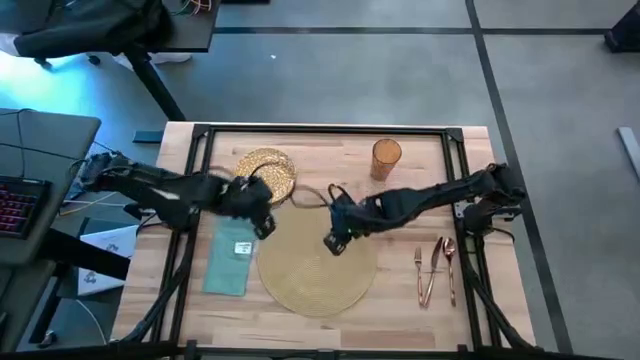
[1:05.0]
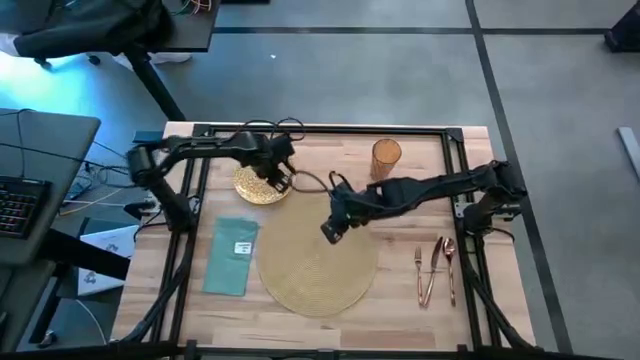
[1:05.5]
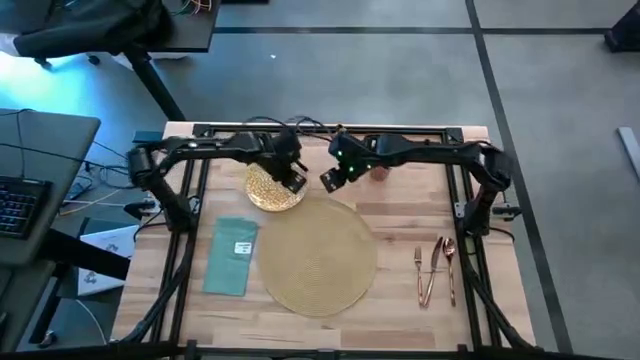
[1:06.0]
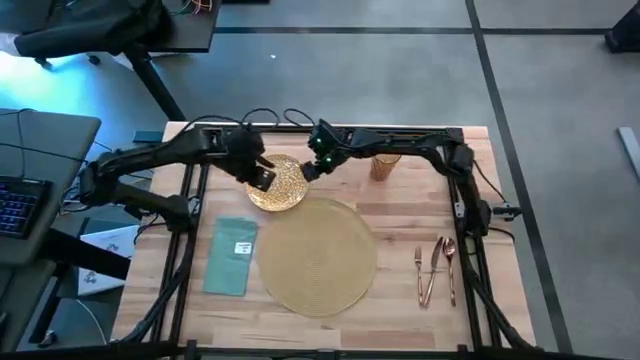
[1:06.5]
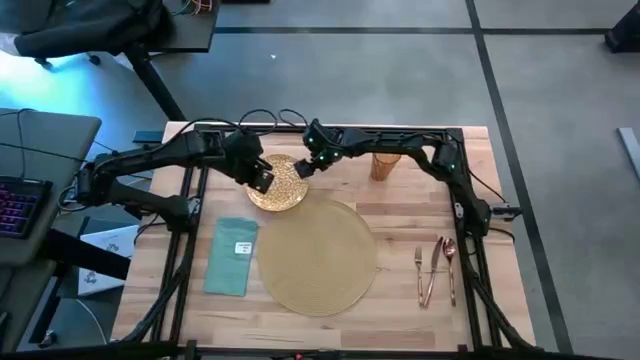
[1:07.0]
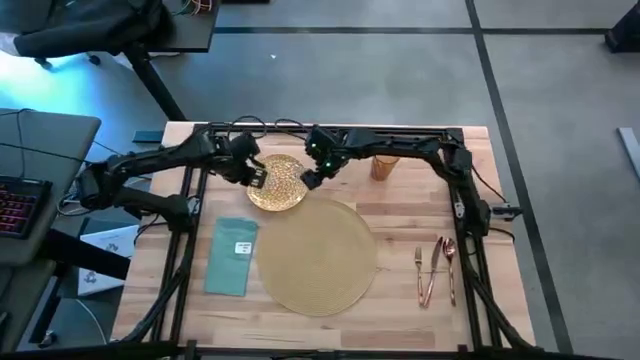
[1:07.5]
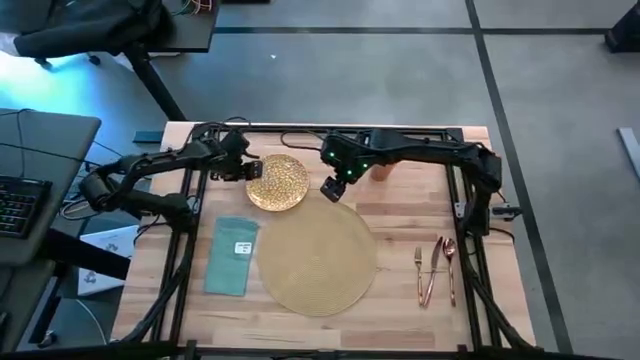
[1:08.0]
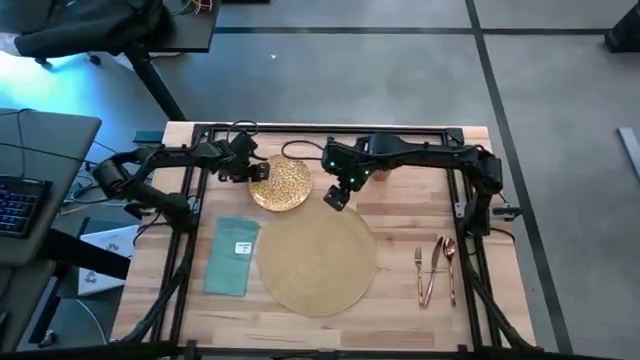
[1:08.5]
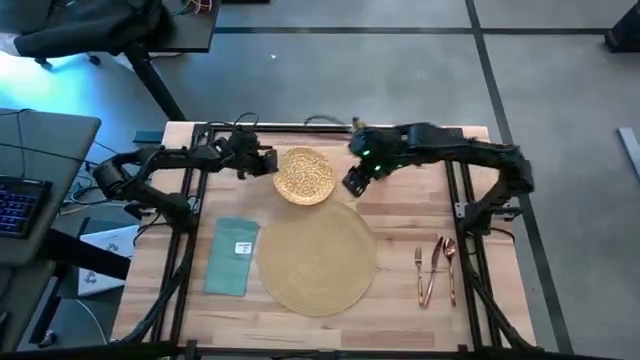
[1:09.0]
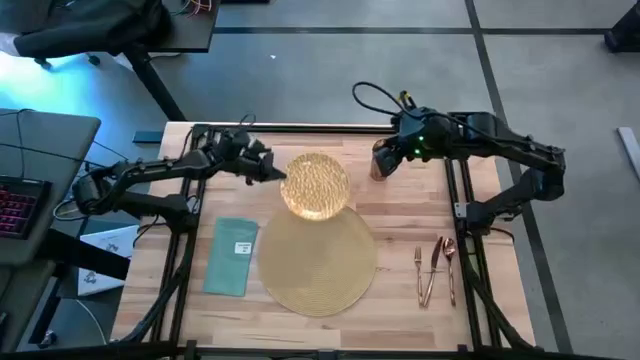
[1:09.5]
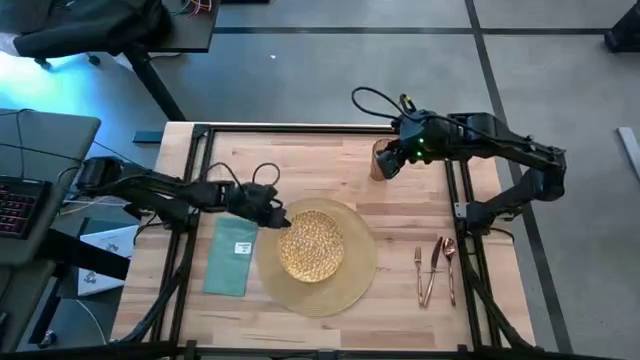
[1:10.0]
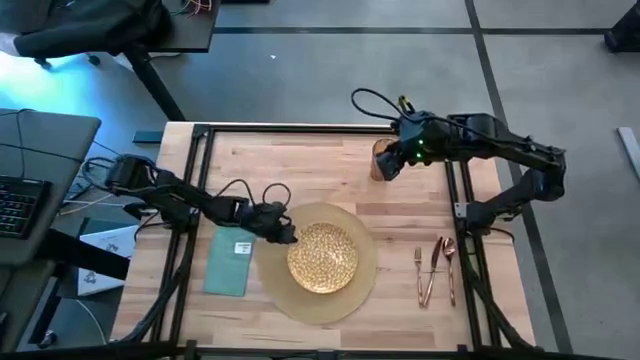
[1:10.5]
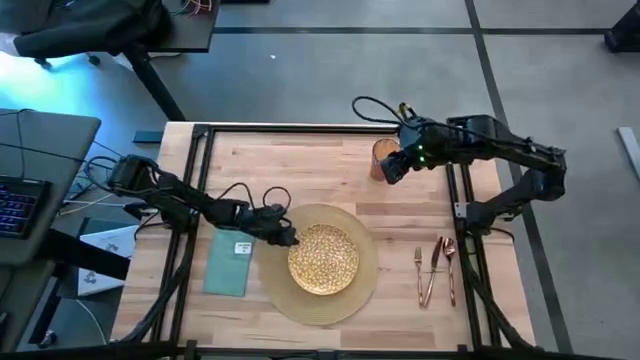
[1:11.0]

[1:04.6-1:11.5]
Task: Set table place
Put the yellow patterned plate on the mat

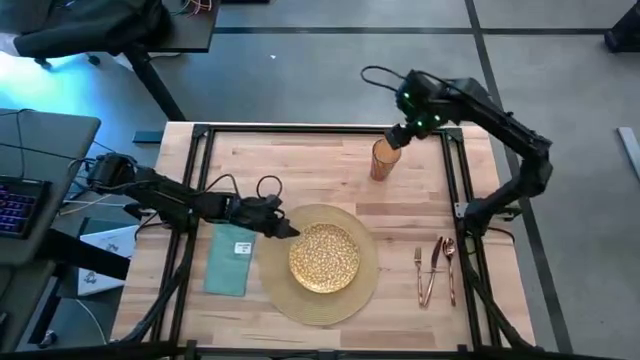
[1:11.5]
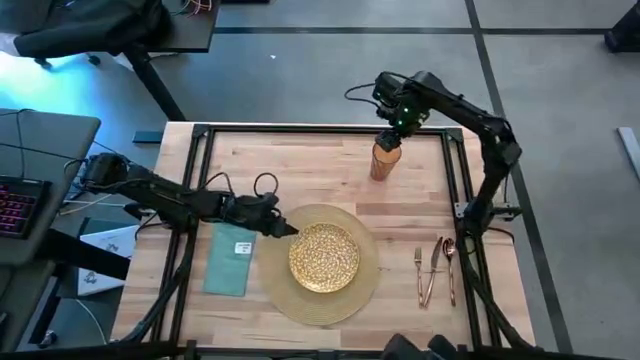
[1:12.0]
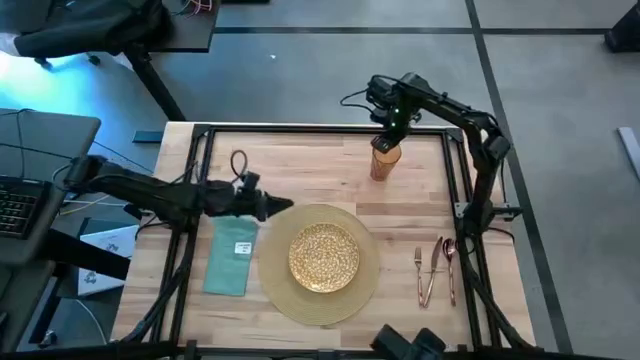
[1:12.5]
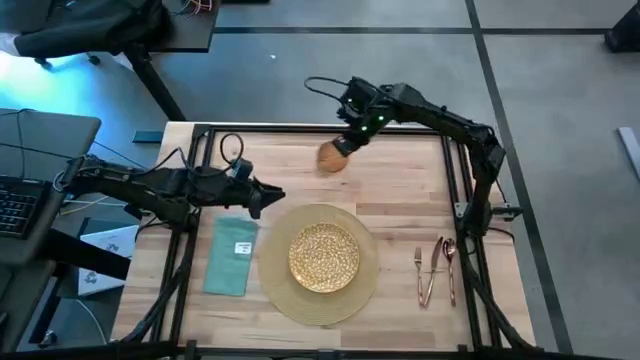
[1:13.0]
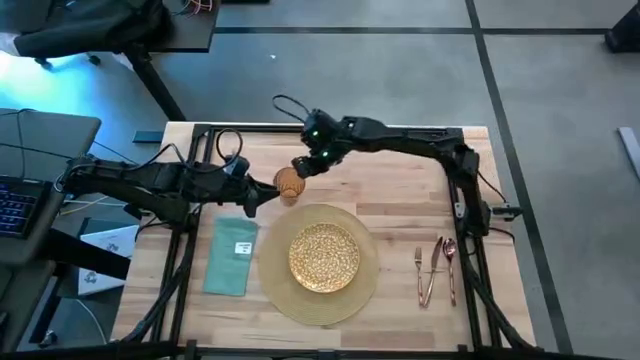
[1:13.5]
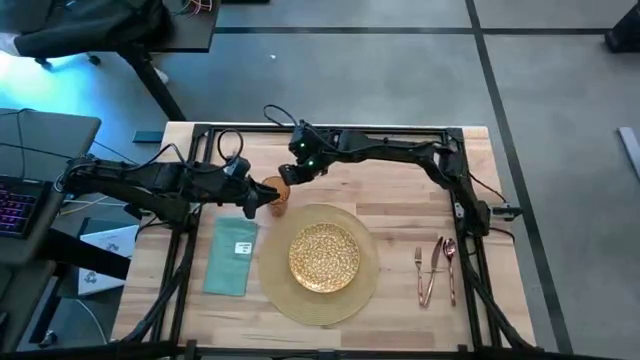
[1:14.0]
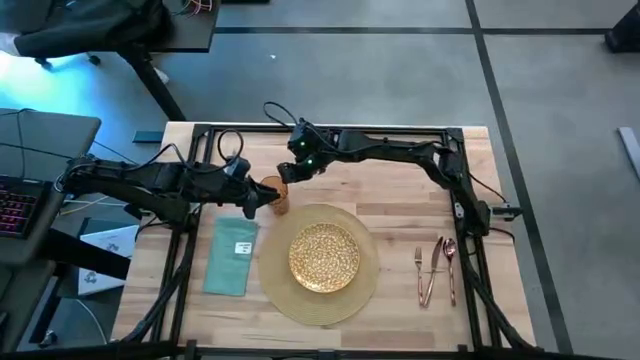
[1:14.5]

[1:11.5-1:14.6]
Put the brown glass to the middle left

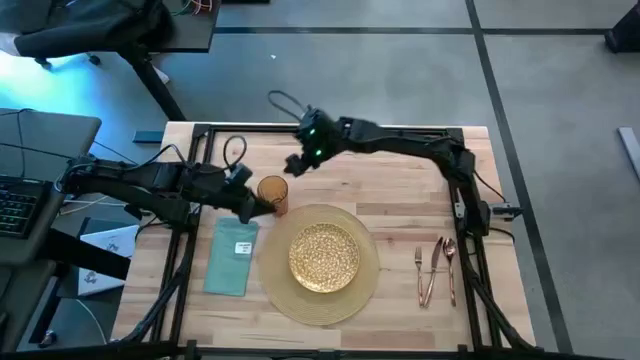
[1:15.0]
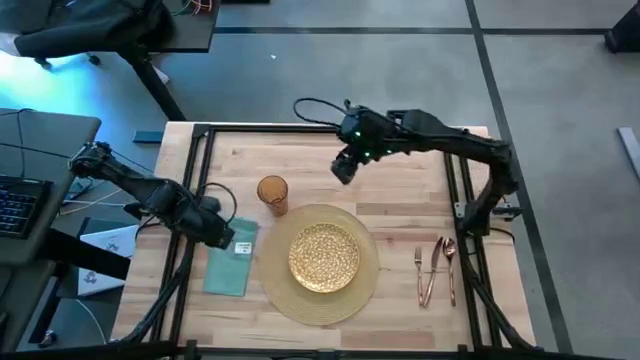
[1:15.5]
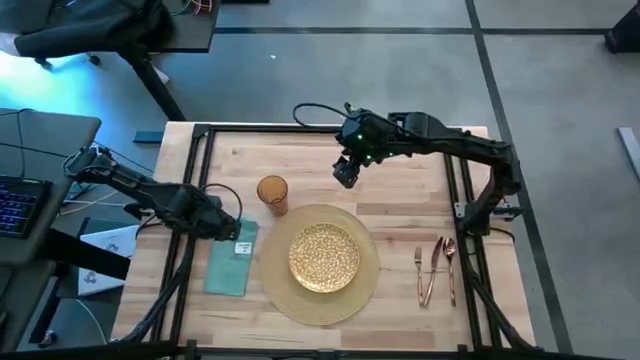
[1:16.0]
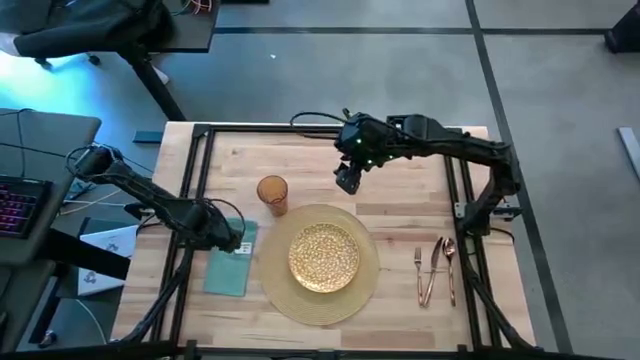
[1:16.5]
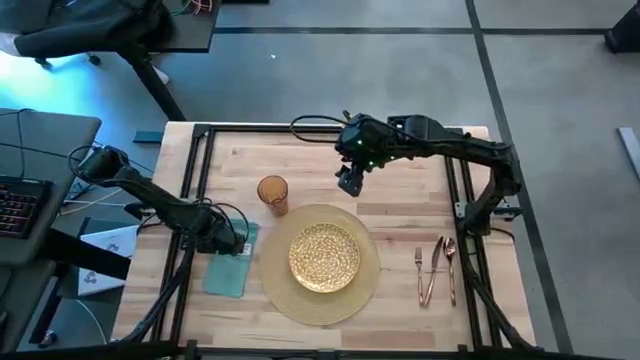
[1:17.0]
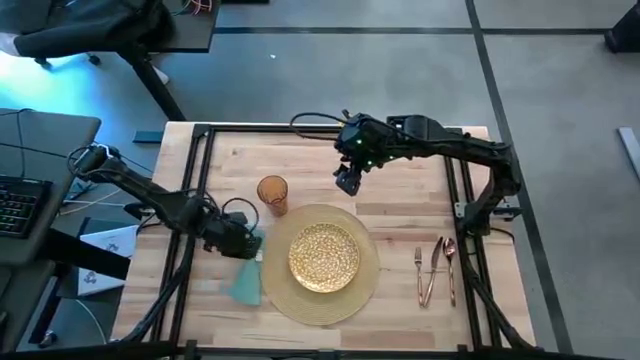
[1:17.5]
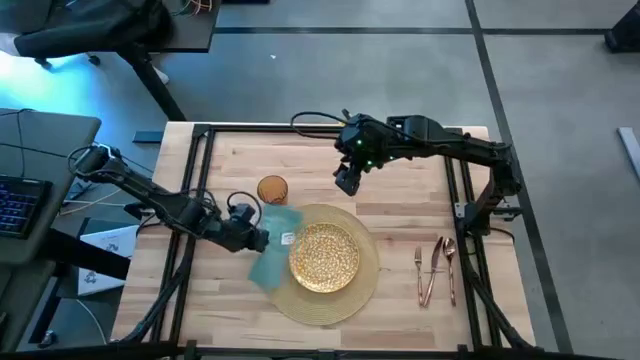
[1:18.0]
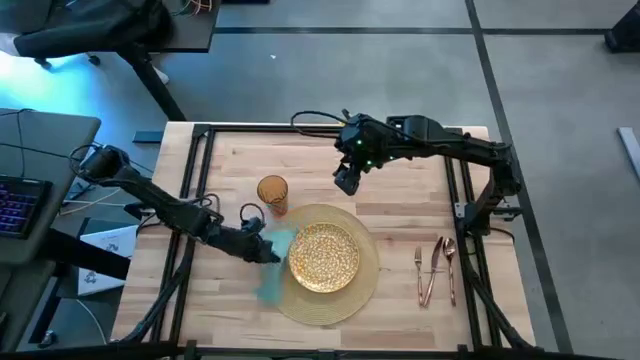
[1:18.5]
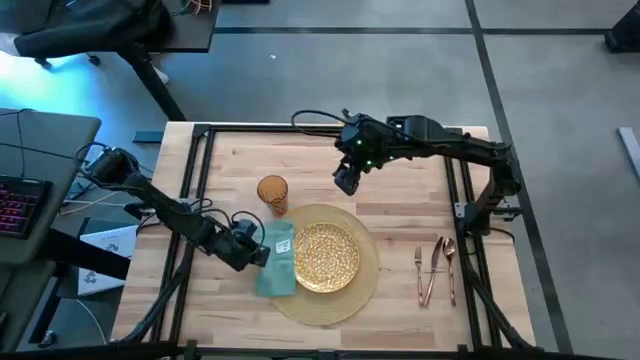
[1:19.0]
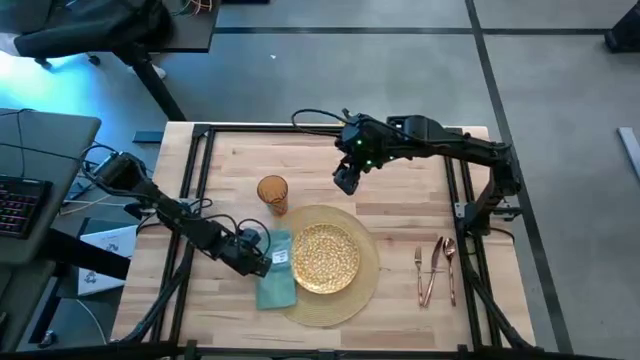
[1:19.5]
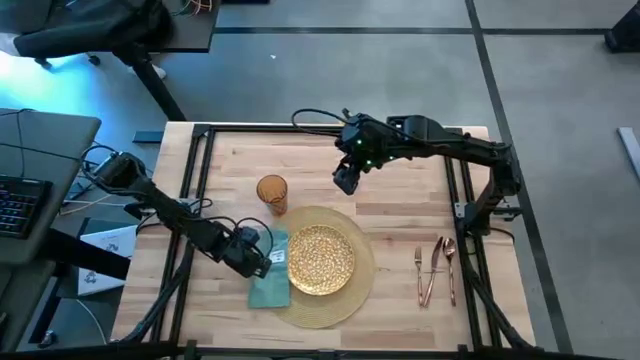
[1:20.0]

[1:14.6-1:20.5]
Put the blue napkin to the left of the mat

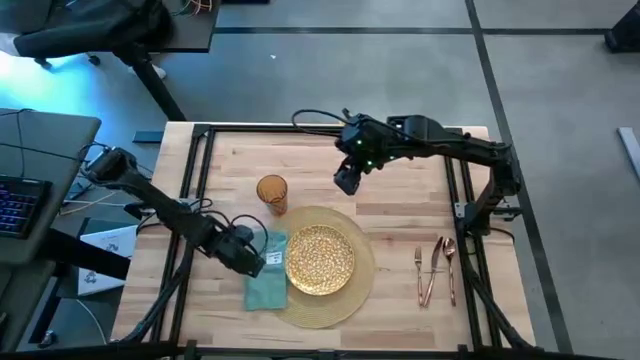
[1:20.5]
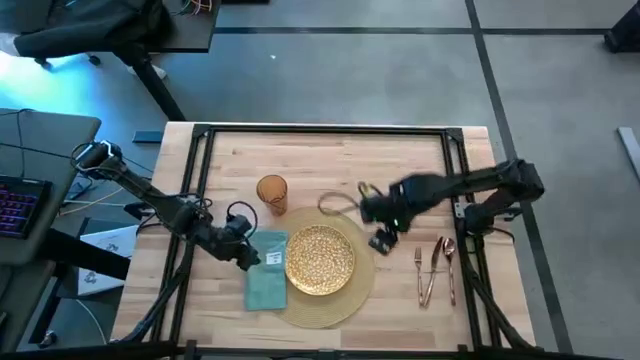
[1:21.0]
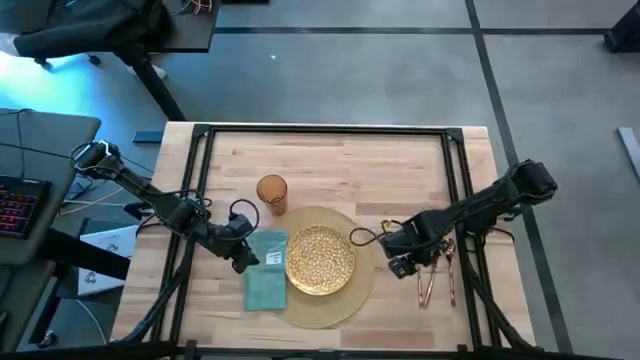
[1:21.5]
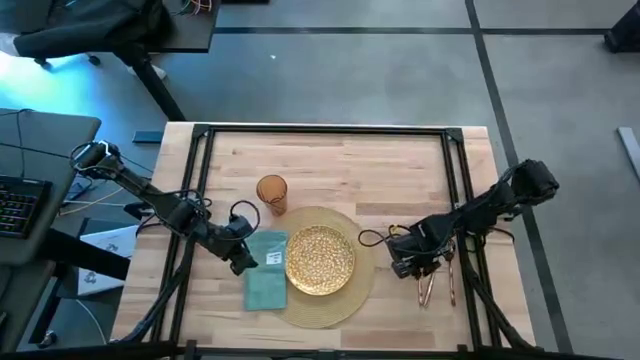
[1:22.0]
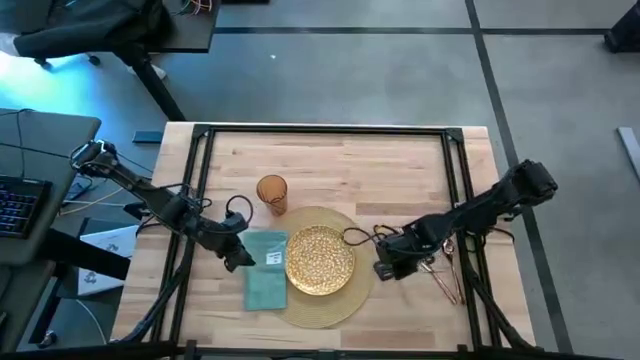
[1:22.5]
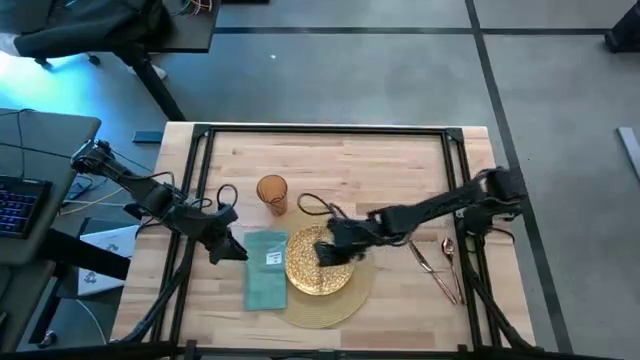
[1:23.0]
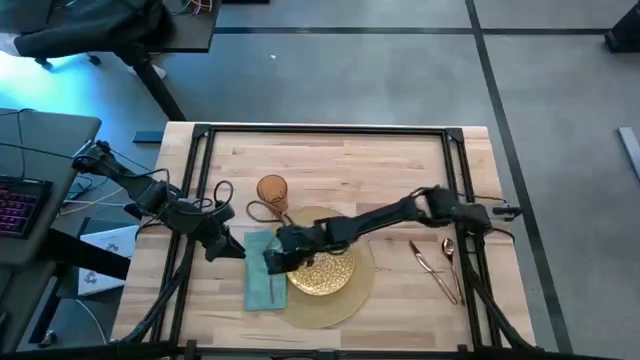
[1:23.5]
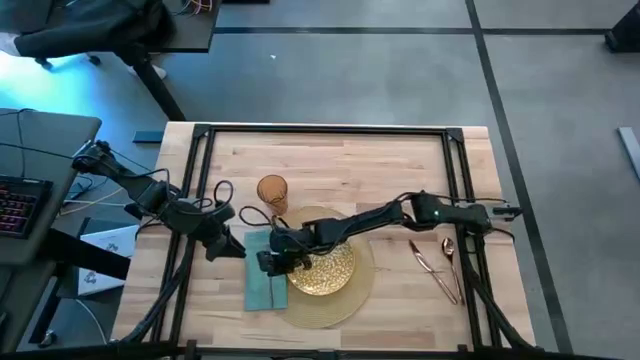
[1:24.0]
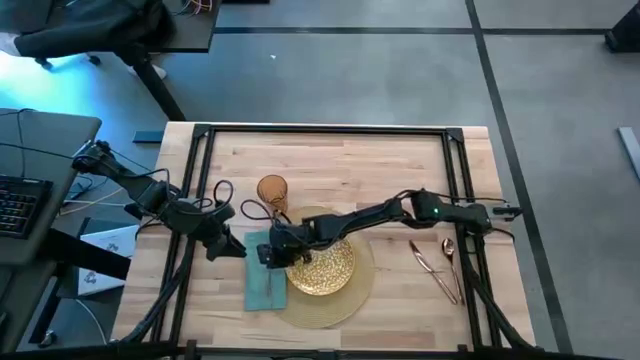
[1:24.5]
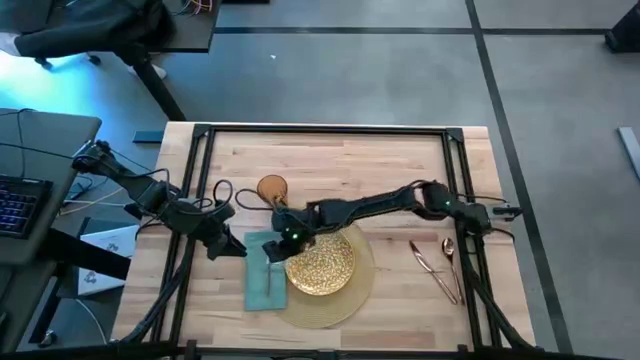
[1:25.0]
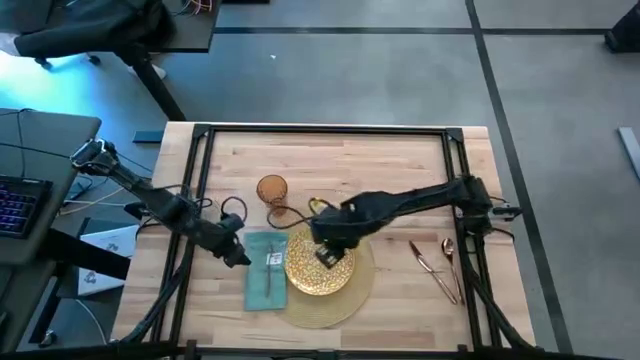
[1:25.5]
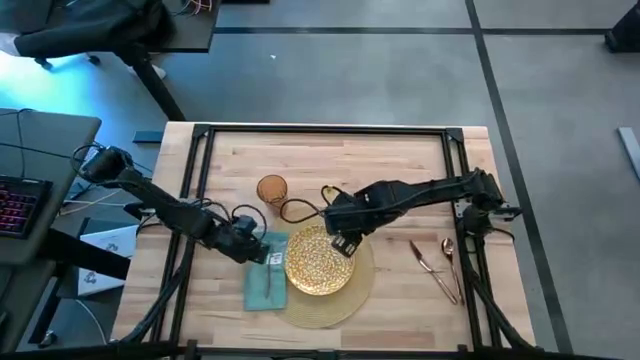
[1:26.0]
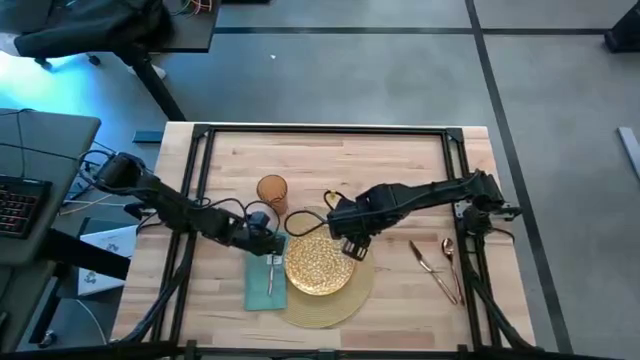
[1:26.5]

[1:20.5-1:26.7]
Put the fork on the blue napkin
